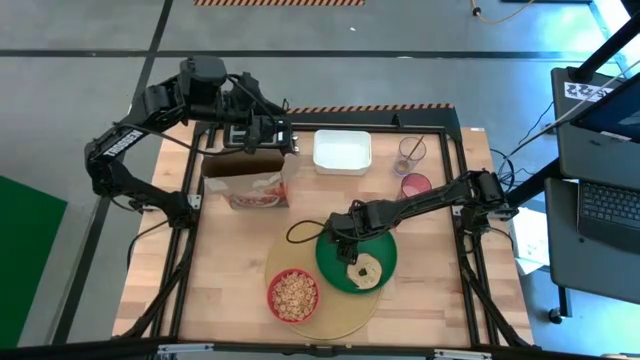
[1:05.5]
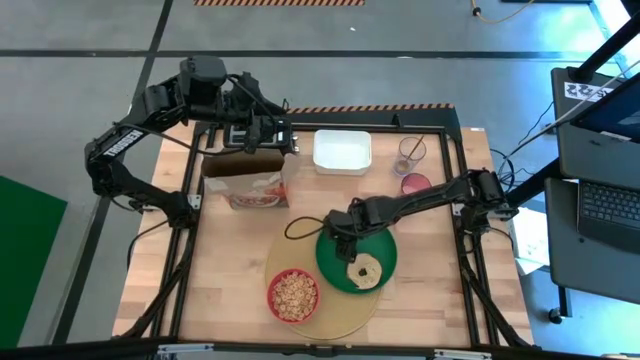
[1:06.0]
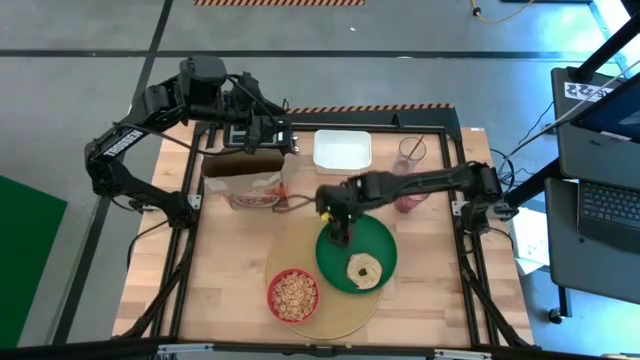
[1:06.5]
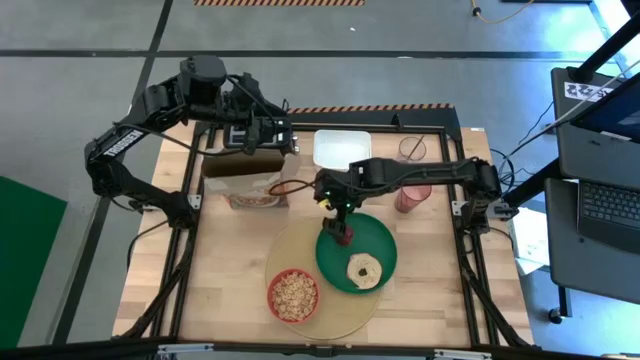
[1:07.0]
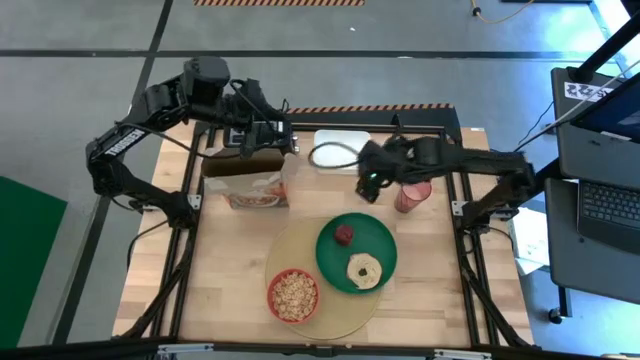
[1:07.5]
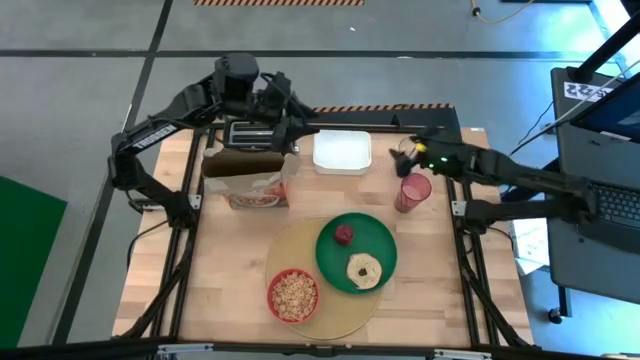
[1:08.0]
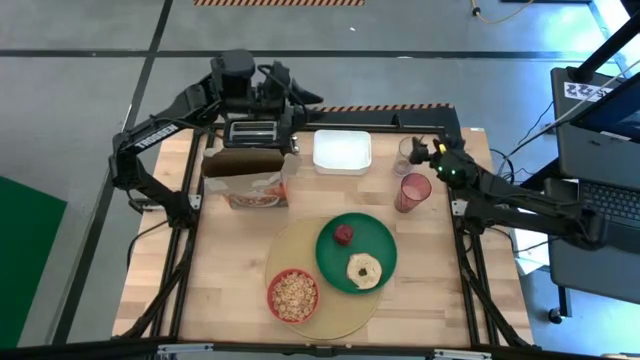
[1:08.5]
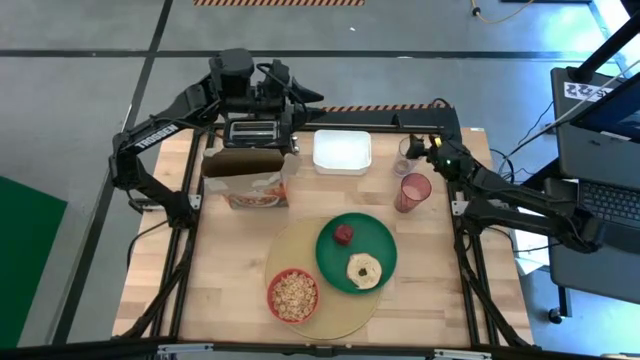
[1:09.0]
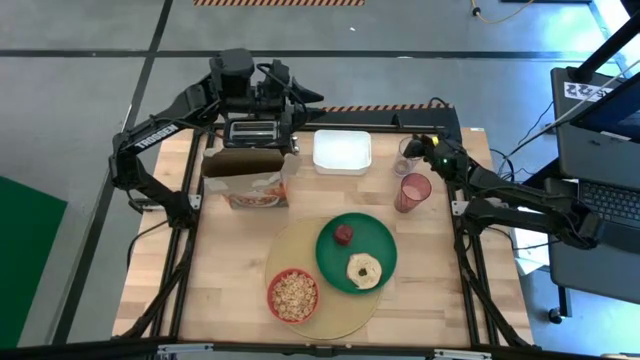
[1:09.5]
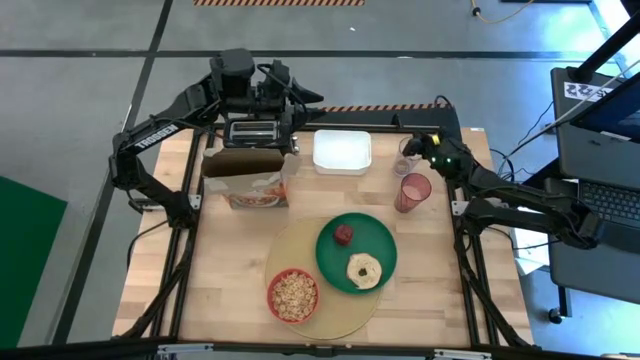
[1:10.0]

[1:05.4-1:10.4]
Task: Arrange a breakfast setting
Put the gold spoon on the brown placemat to the right of the orange bowl

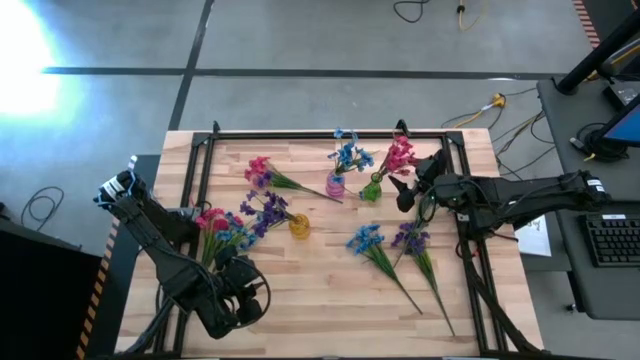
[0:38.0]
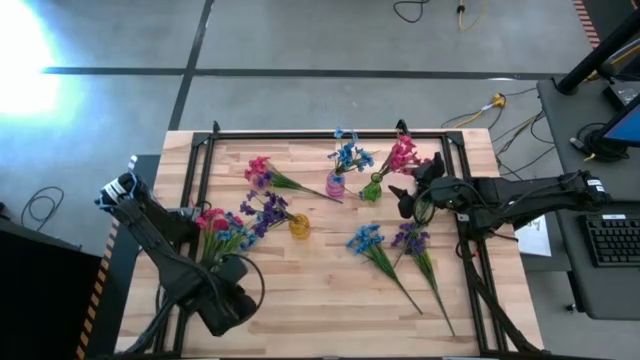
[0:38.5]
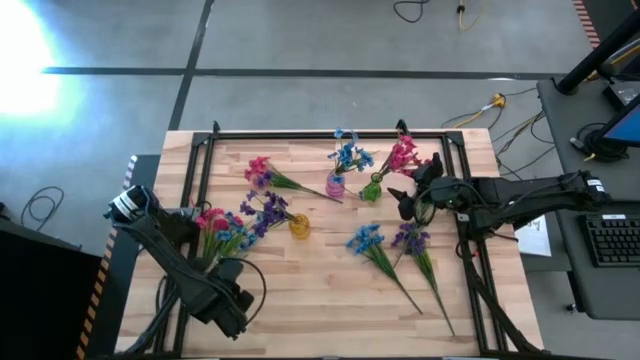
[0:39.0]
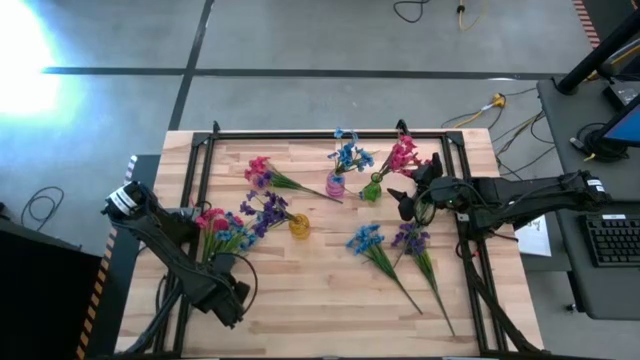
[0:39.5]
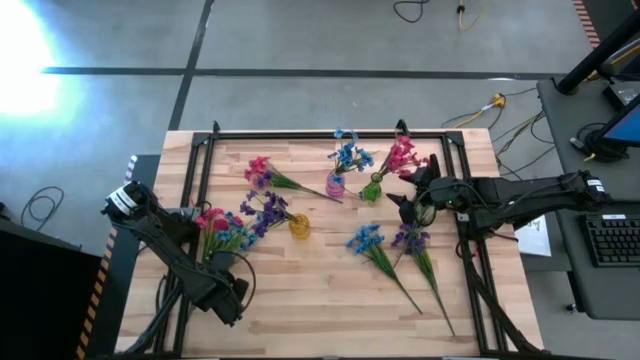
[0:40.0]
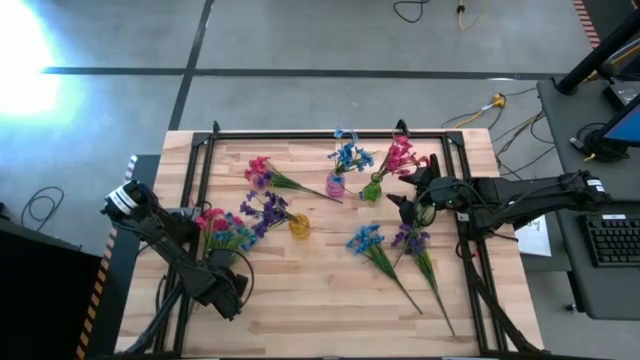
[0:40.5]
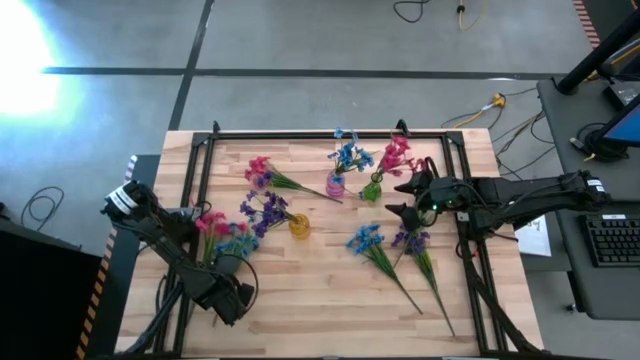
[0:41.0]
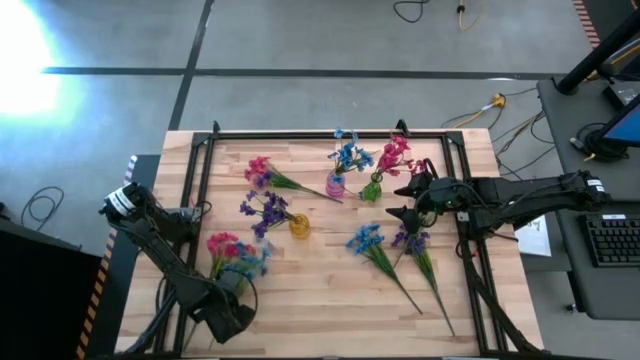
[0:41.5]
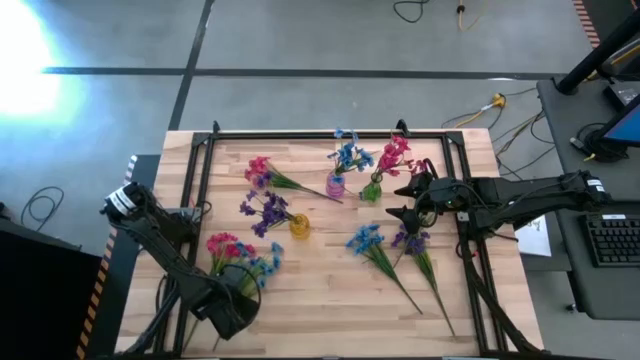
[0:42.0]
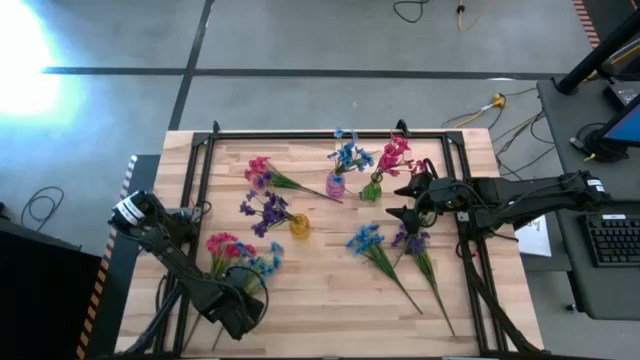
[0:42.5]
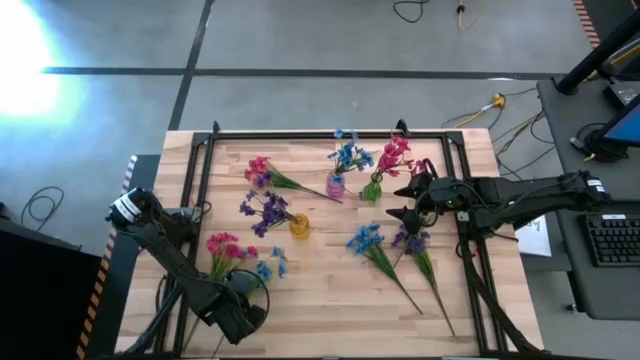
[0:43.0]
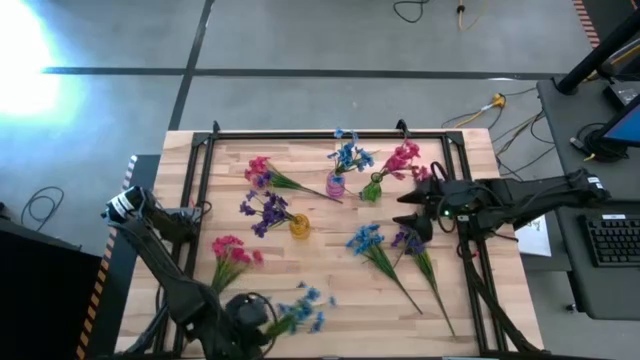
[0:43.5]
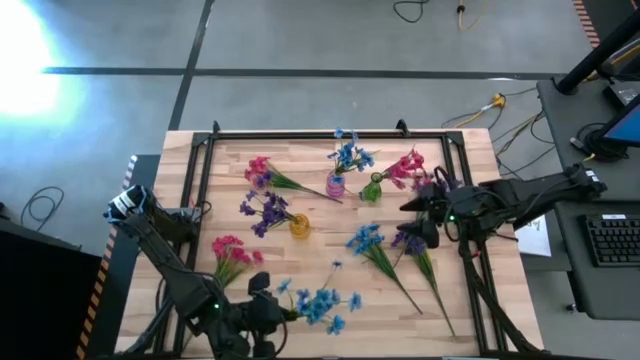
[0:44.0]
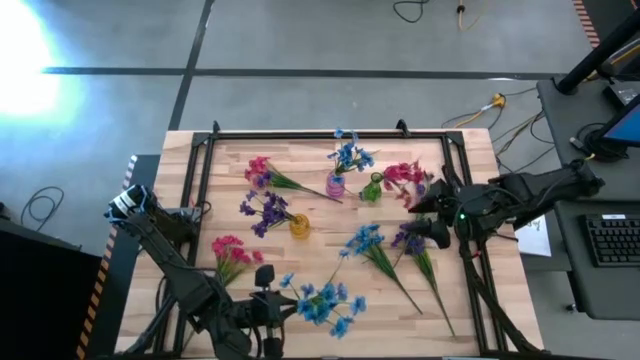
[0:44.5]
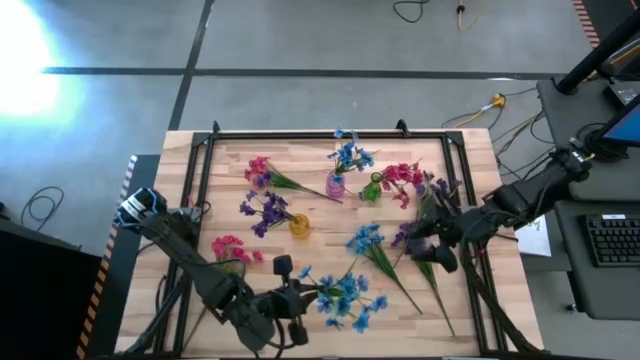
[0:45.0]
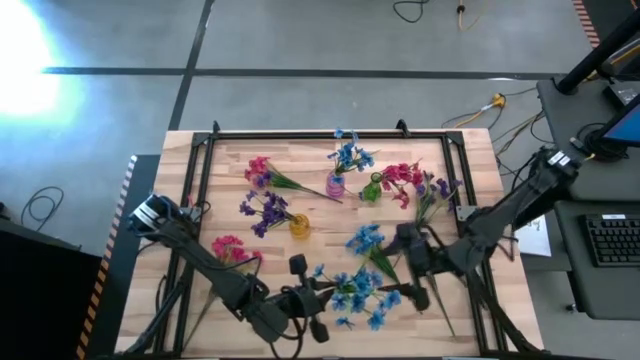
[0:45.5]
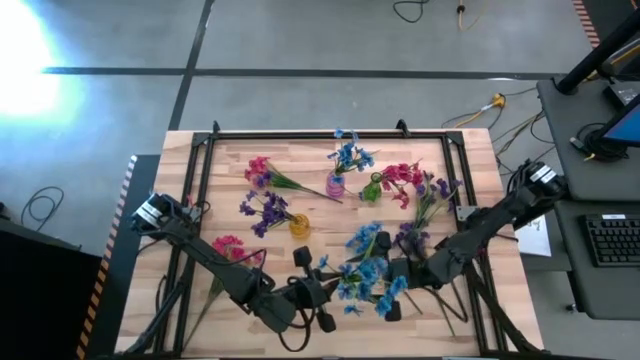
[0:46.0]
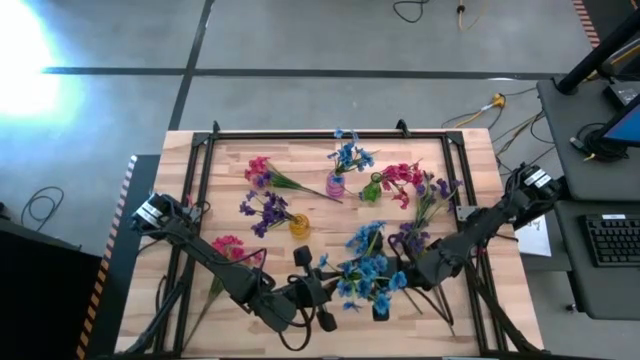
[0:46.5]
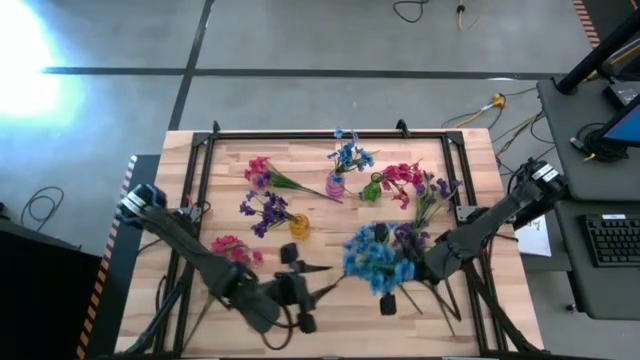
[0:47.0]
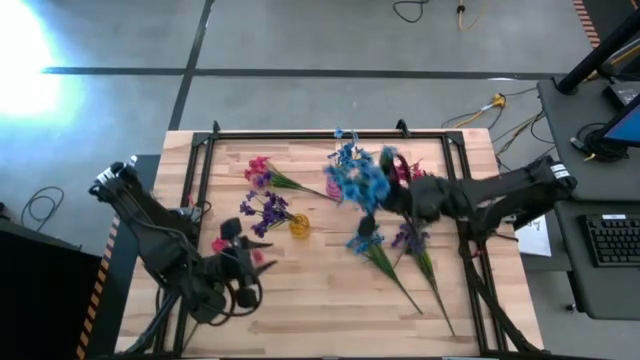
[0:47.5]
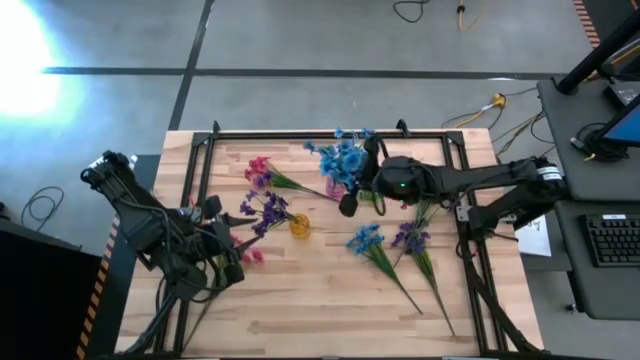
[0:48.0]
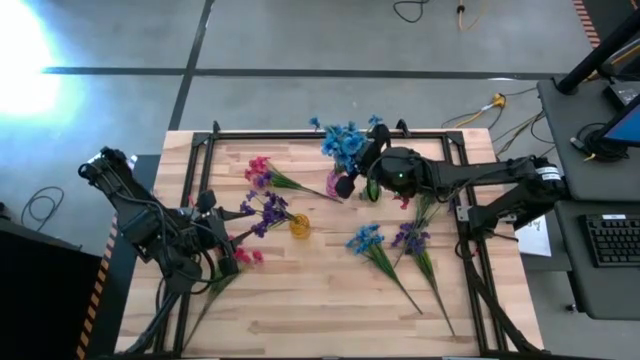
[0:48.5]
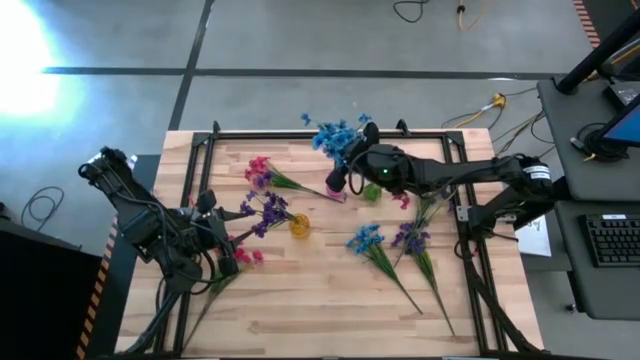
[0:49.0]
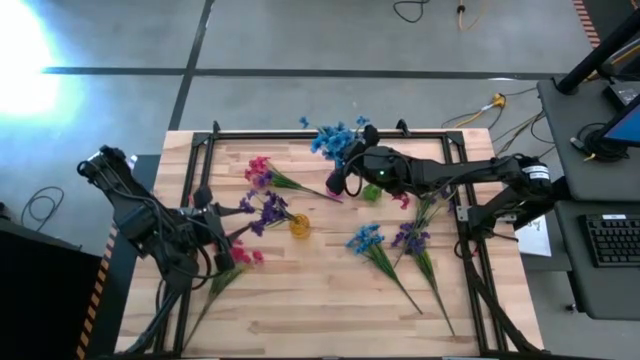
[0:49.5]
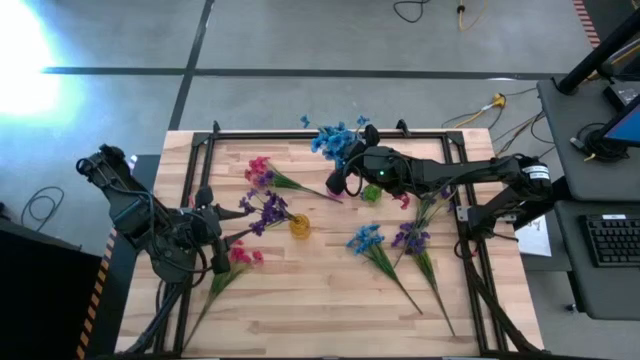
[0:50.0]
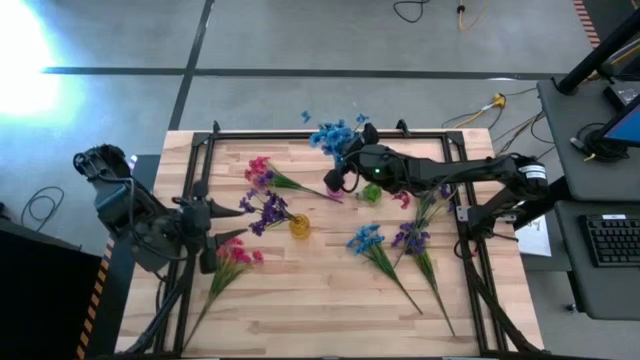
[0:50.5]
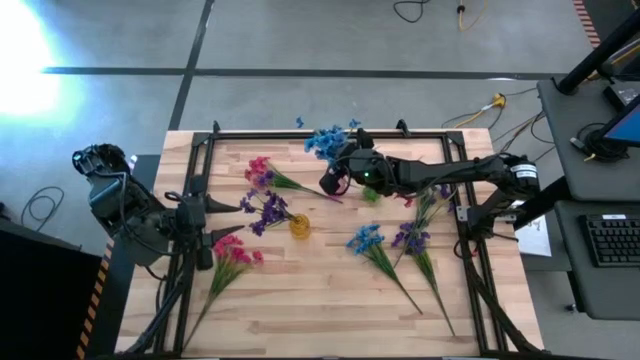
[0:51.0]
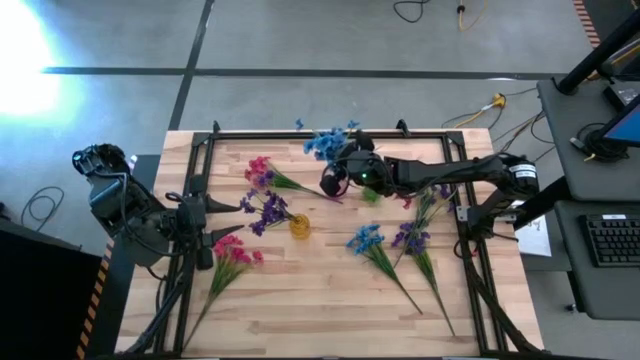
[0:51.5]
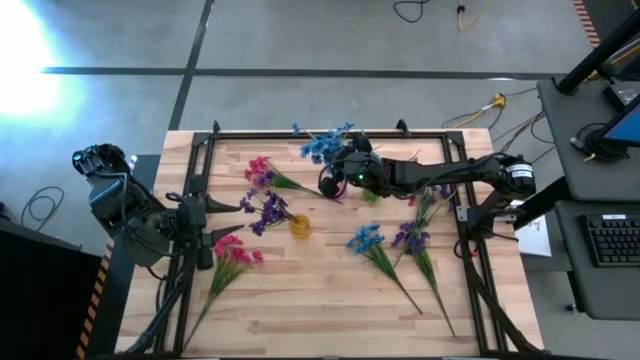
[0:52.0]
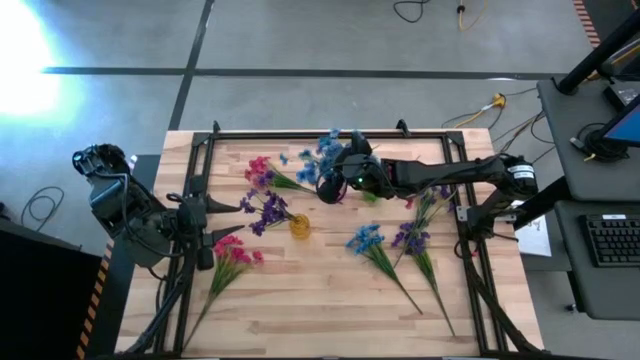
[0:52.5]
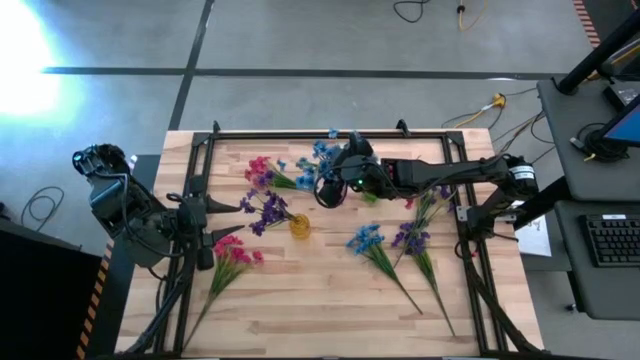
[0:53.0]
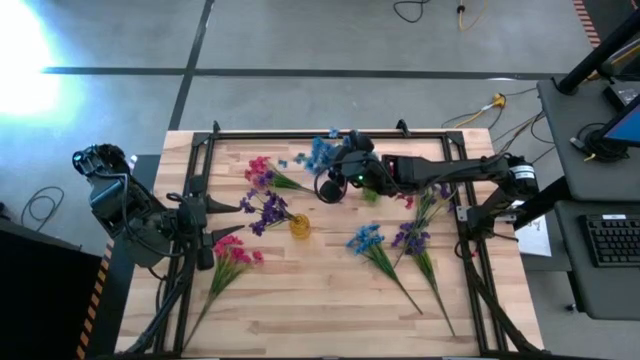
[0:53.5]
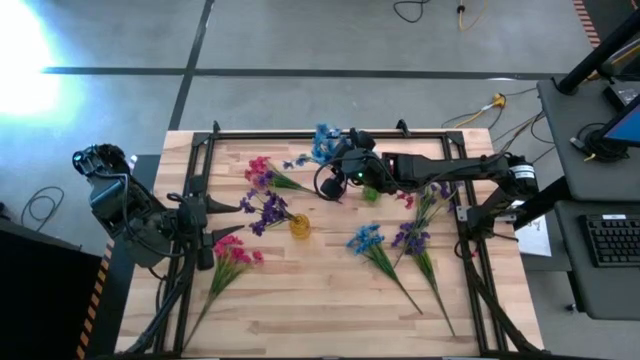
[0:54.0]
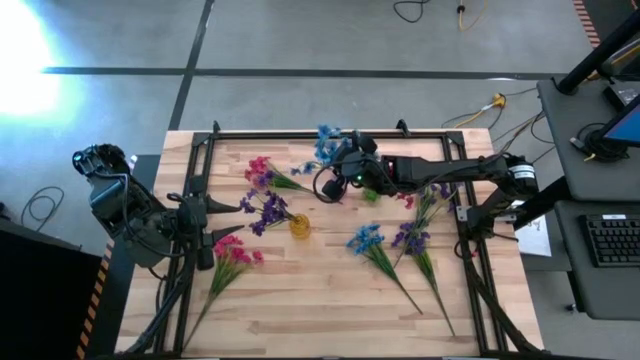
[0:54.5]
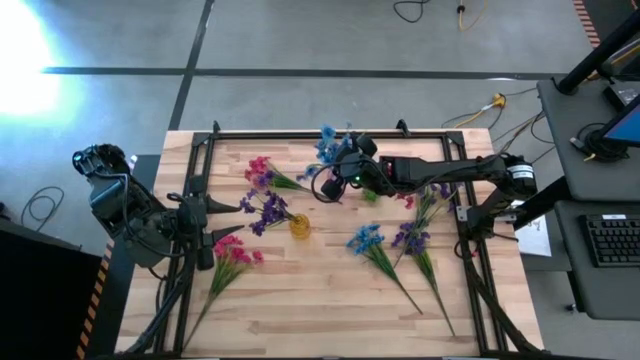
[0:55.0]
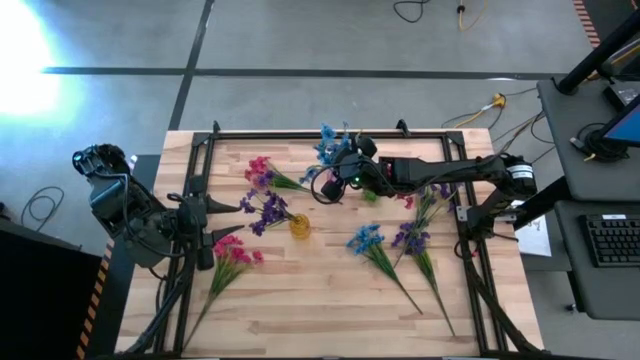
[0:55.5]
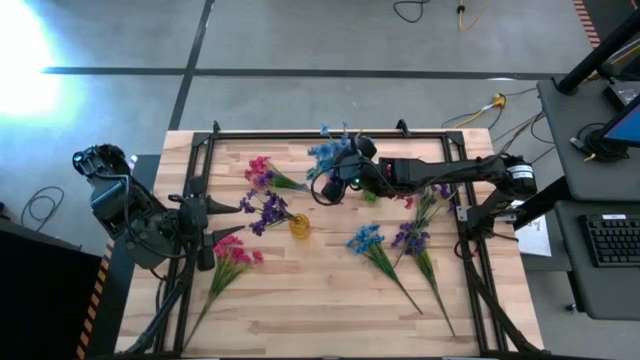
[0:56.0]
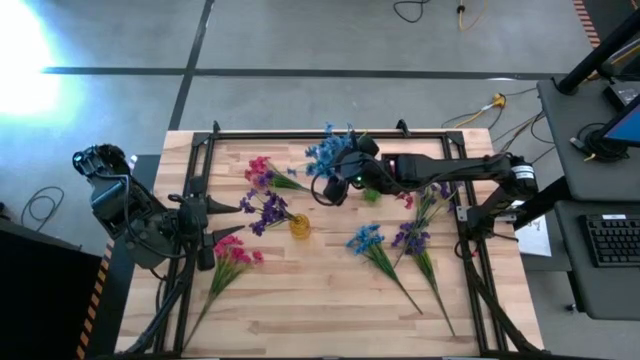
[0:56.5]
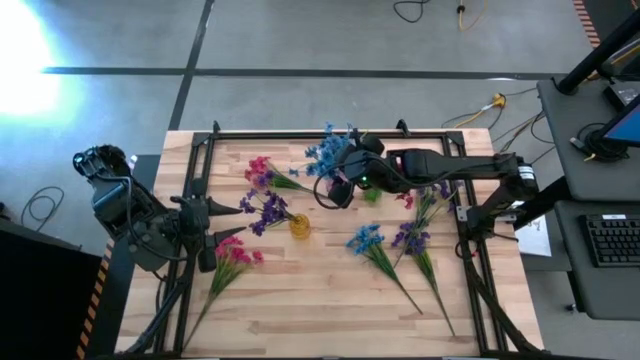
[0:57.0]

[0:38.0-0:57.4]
Task: Sort flowers into vase by color
Put the left blue flowers into the pink vase
